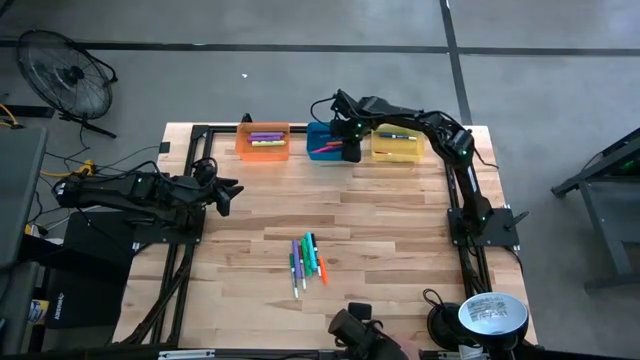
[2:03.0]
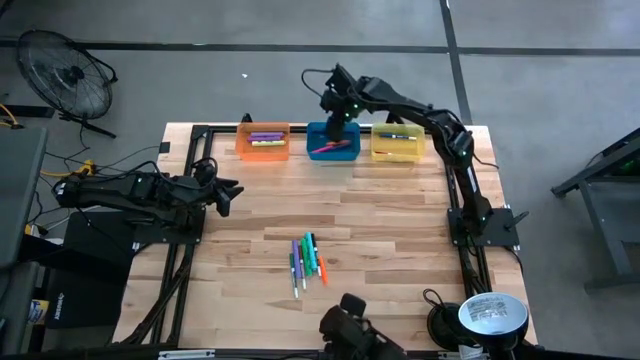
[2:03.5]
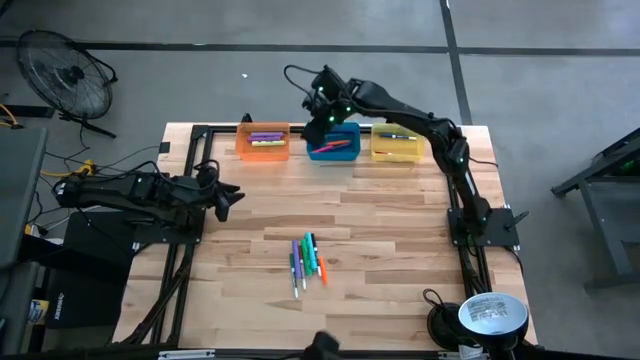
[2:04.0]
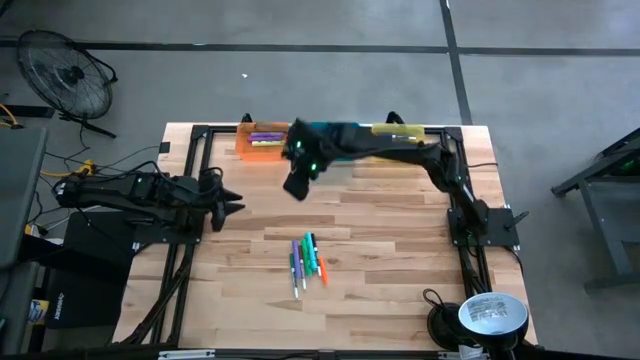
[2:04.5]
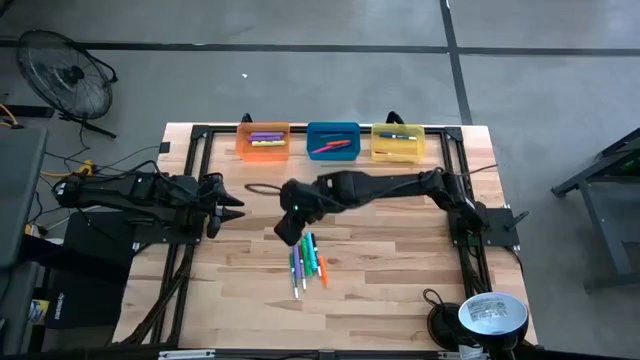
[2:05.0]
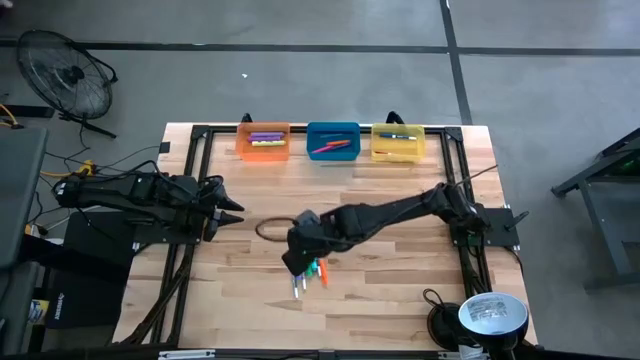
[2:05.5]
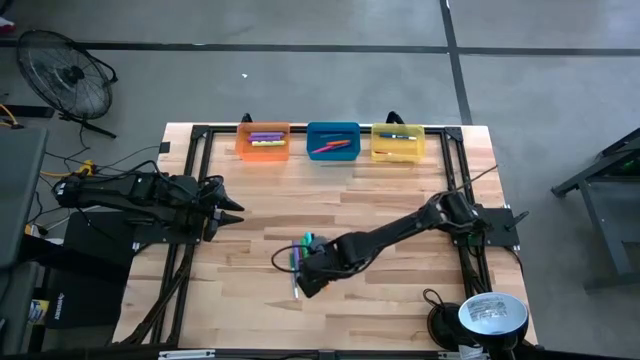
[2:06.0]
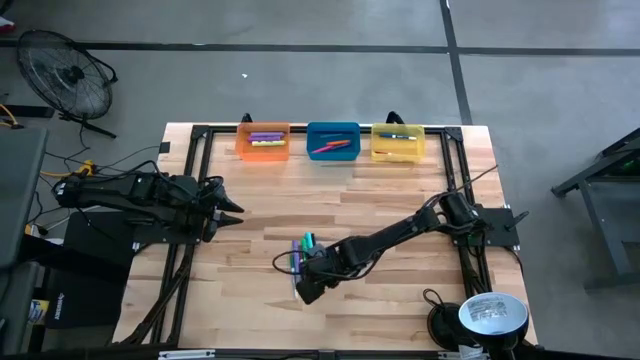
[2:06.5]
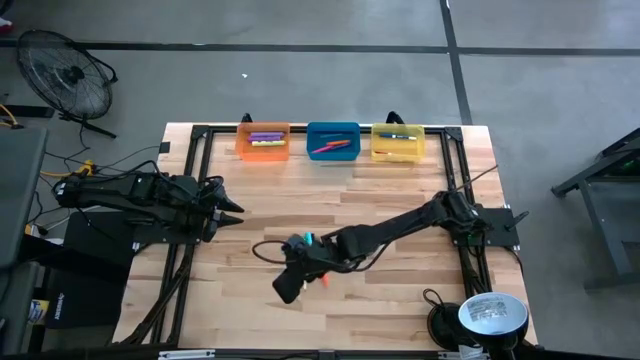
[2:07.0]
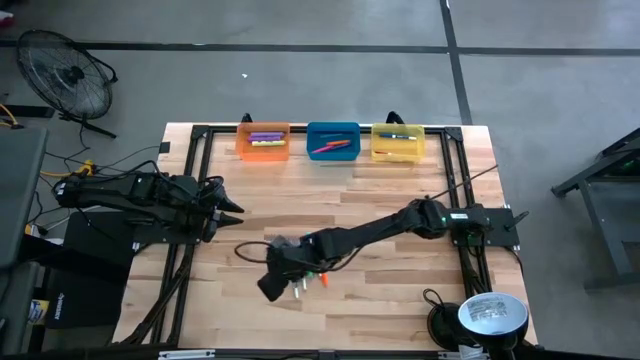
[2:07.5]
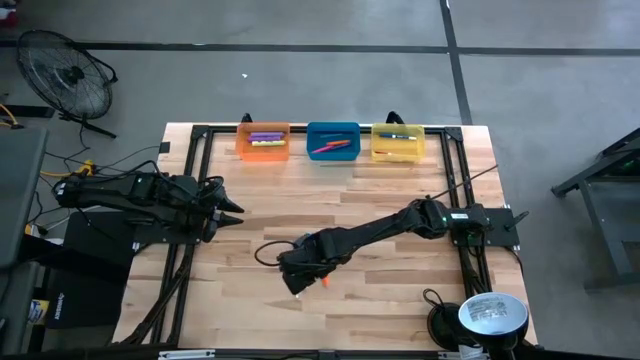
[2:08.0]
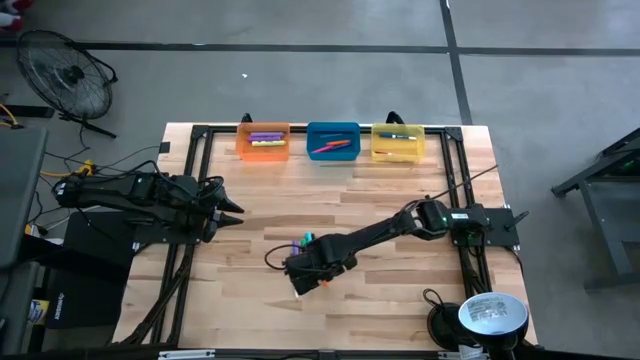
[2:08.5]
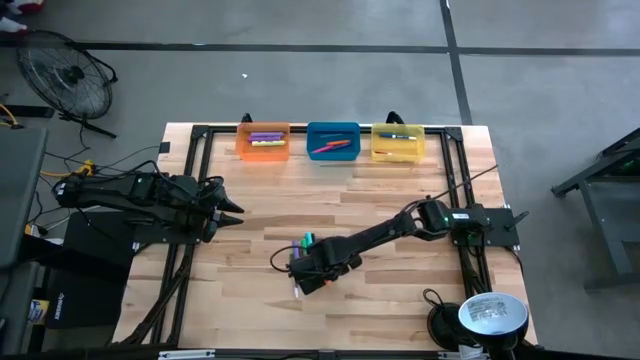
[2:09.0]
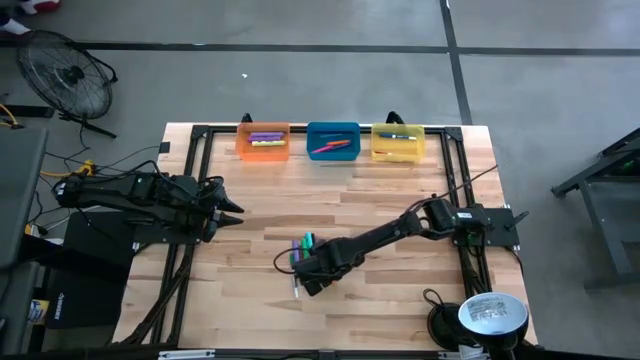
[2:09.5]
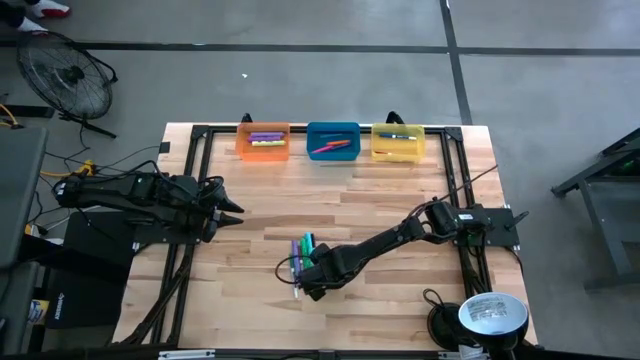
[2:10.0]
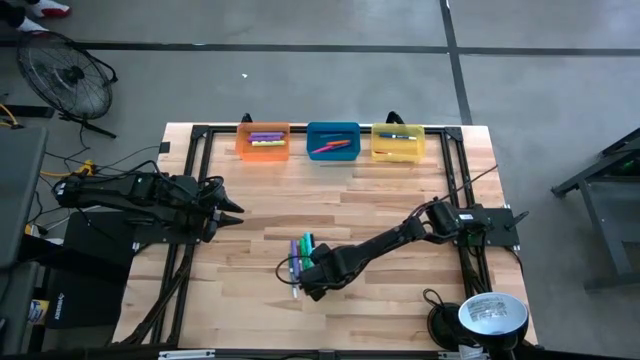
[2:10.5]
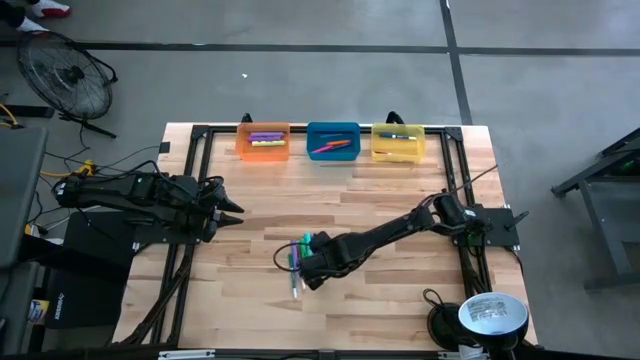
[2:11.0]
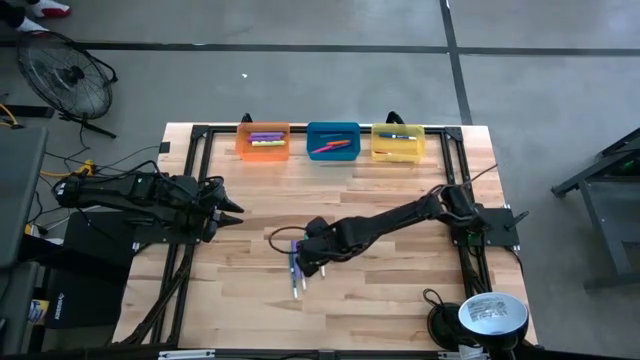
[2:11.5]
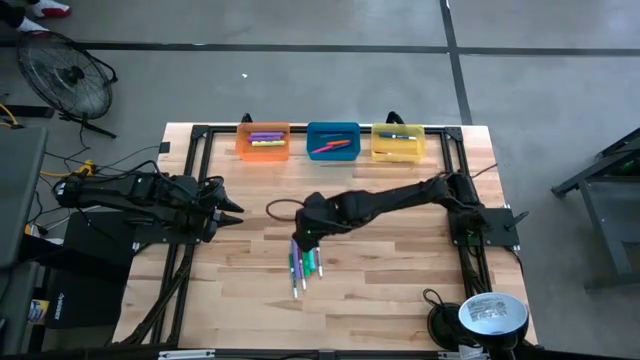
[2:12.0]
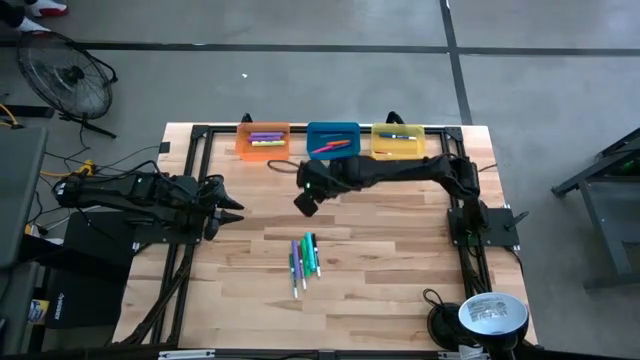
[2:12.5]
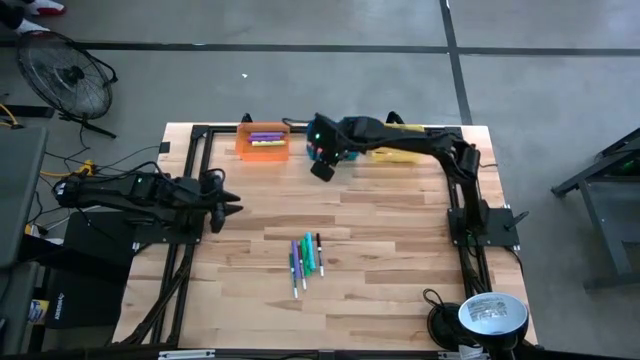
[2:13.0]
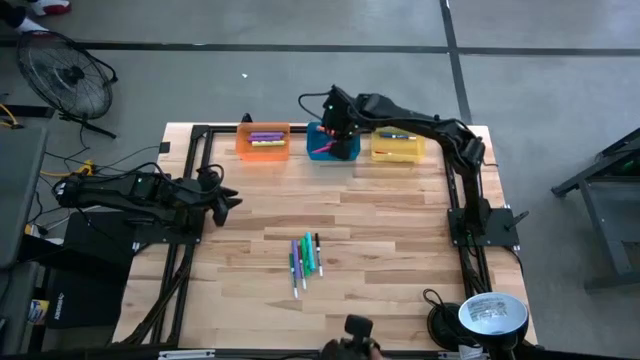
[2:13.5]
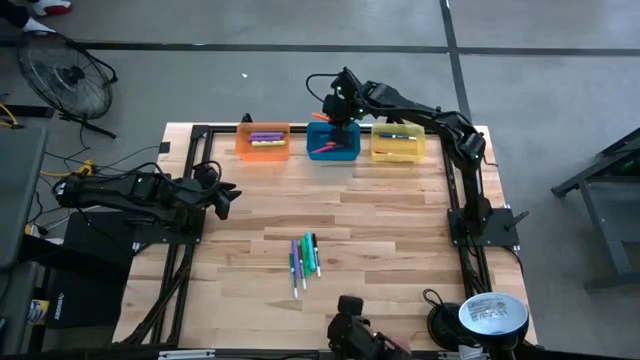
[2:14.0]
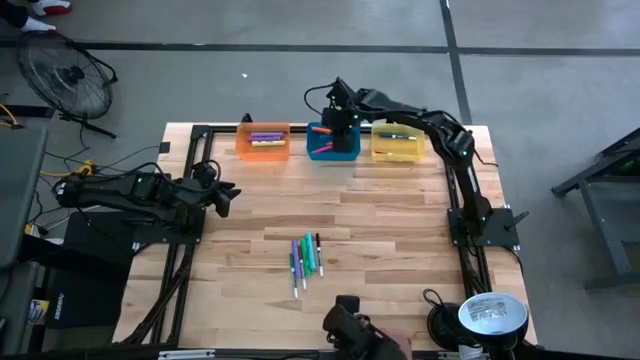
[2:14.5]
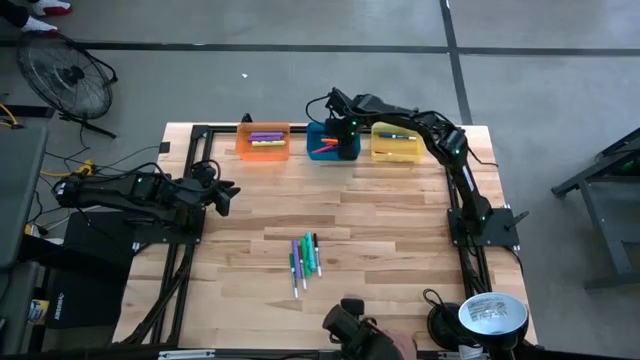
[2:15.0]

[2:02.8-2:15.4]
Task: Pick & Place Markers
Put the orange pen into the blue bin

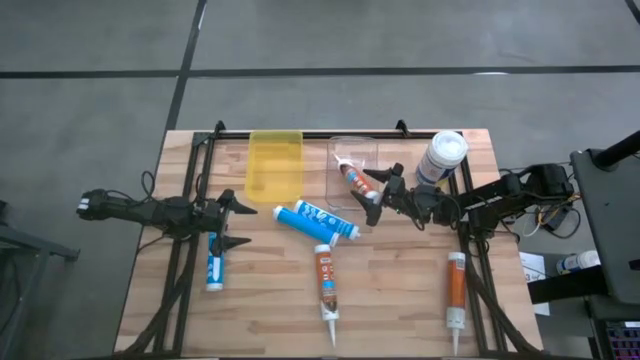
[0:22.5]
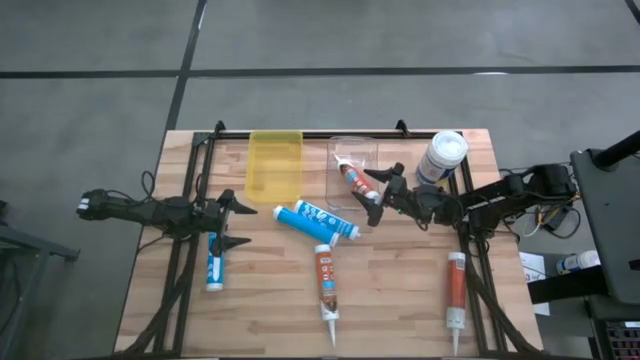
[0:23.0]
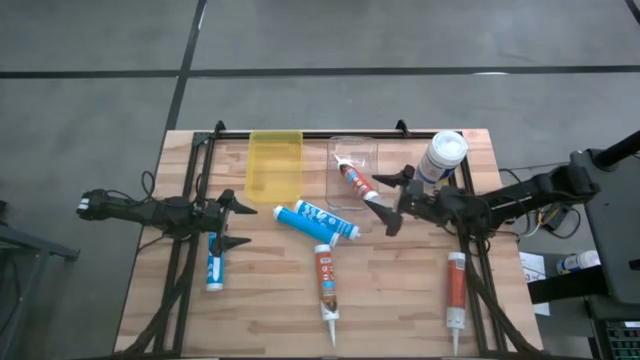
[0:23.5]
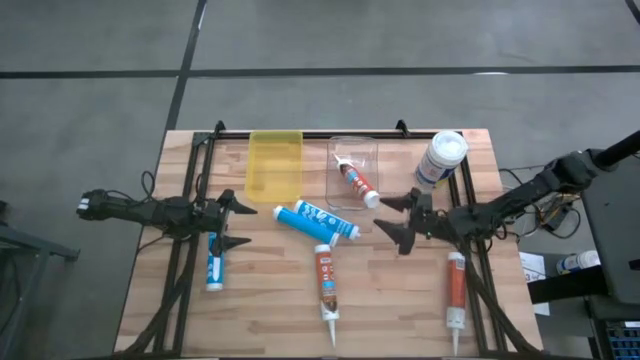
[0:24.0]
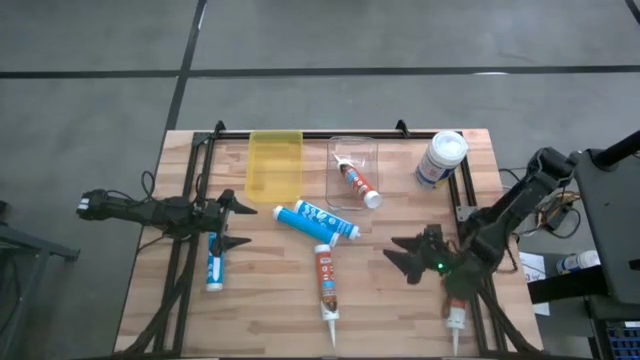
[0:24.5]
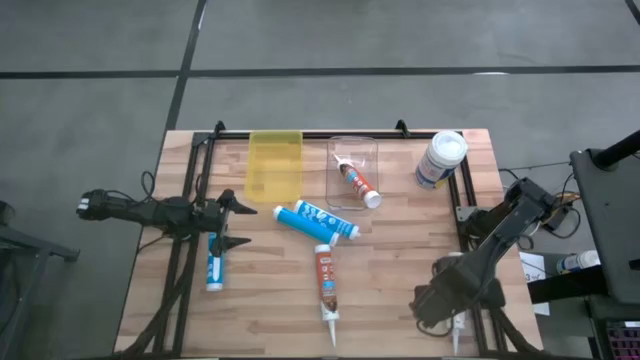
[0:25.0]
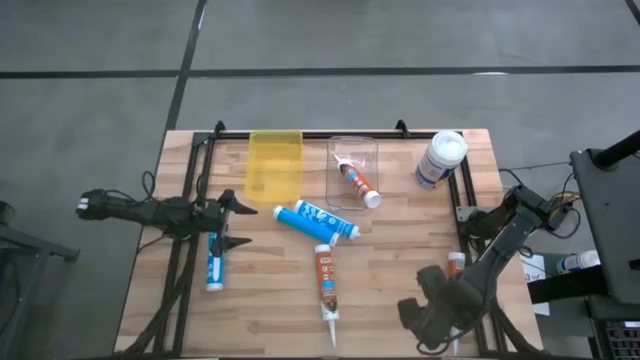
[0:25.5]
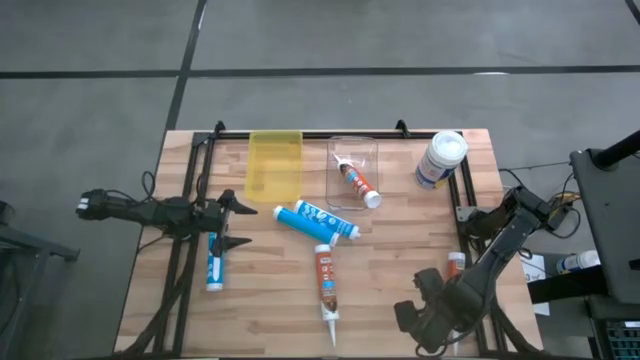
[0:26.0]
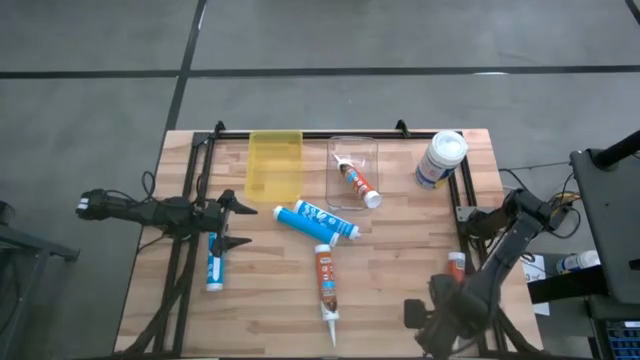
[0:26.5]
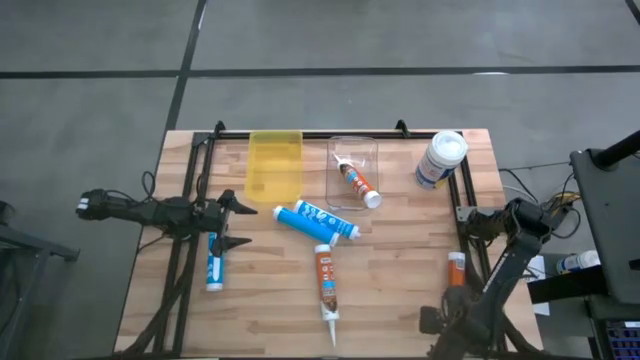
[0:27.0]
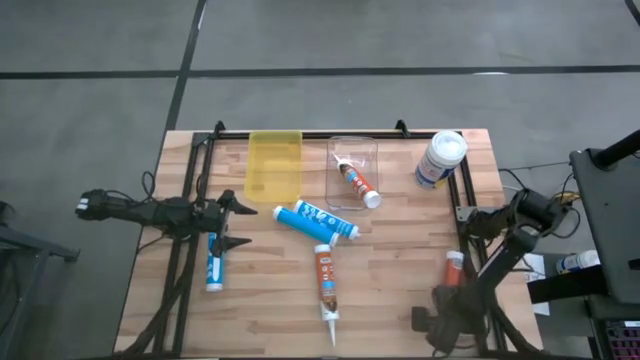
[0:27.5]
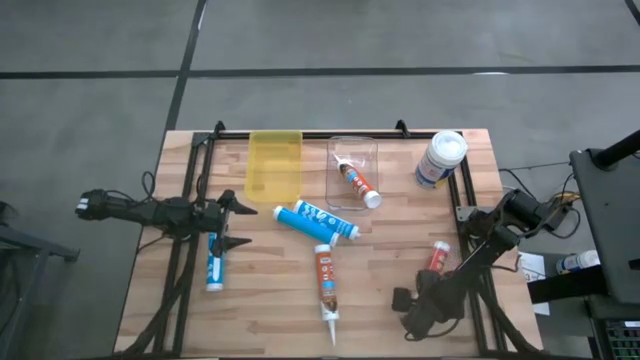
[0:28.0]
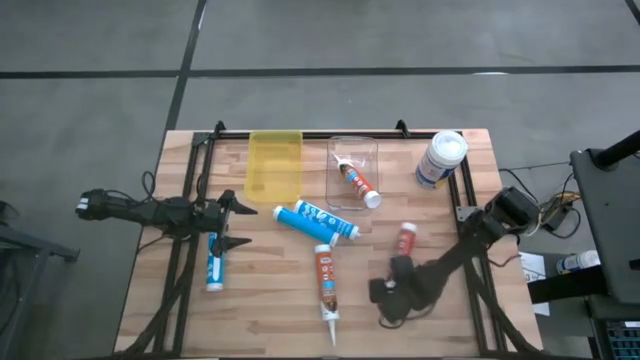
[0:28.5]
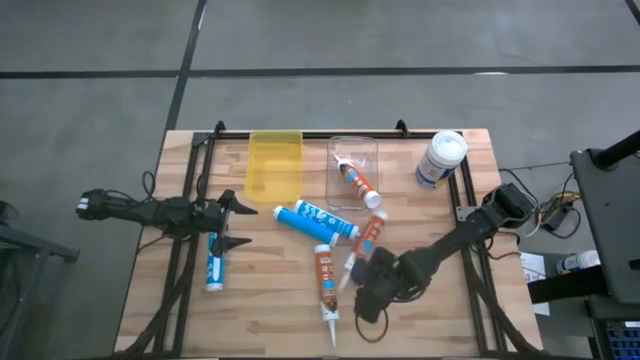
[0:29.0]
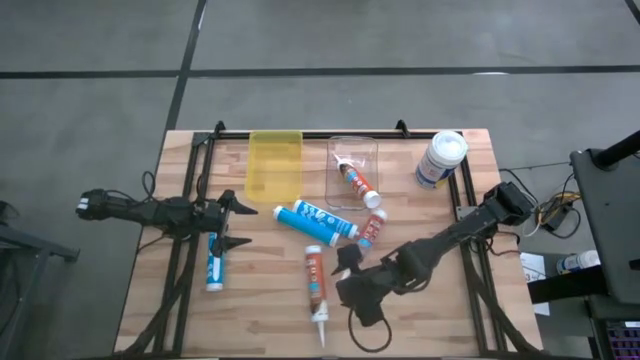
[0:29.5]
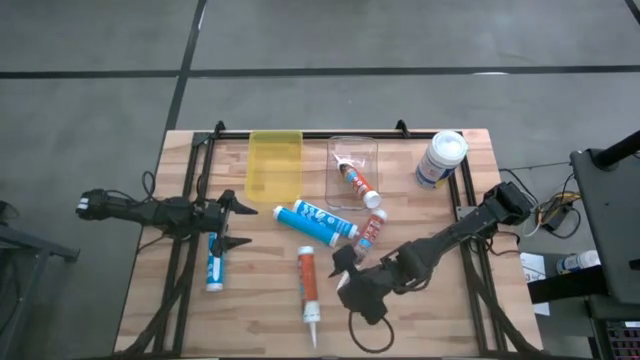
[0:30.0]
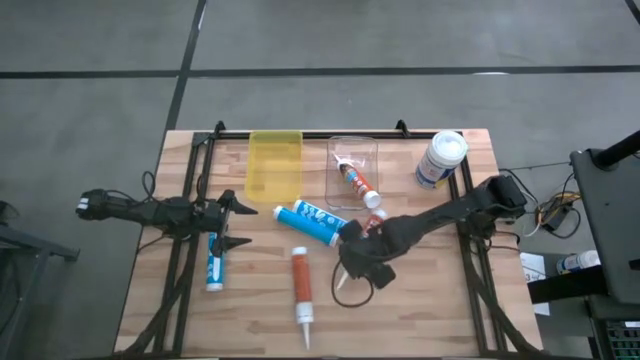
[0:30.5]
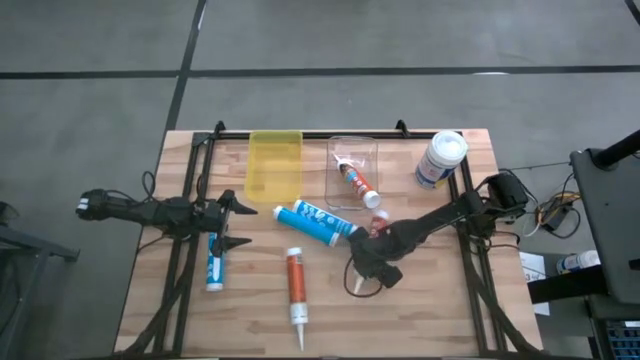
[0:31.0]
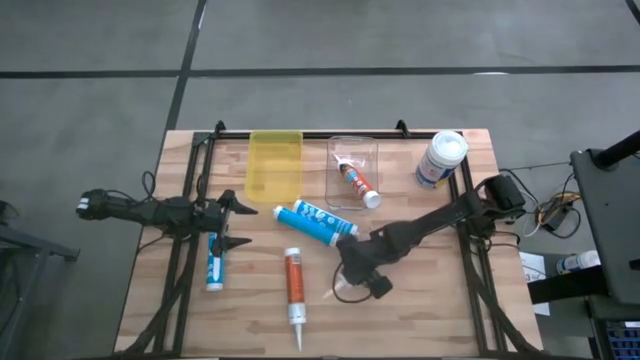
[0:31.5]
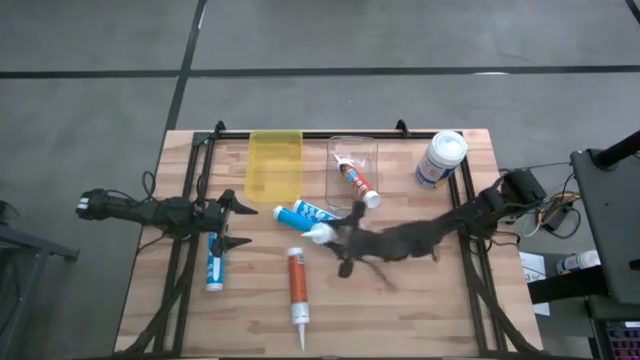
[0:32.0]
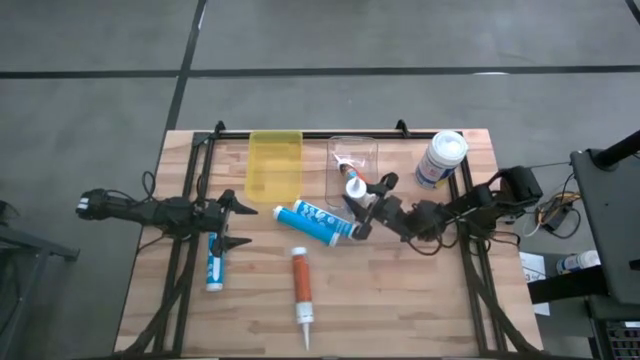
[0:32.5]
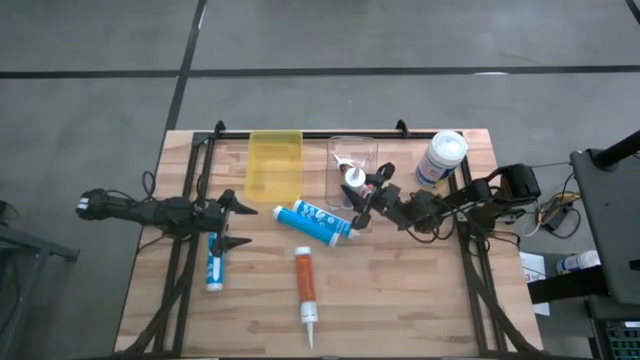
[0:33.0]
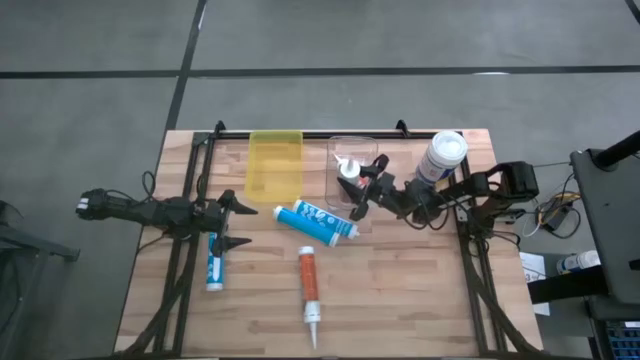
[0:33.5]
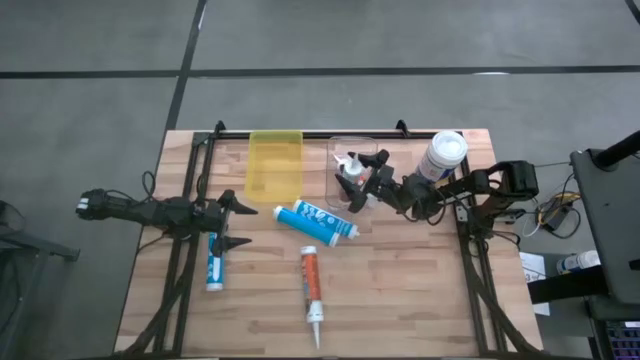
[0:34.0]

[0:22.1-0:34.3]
Task: Pick & place silicon tubes, Sealant and Lysol wipes
Put the right orange sealant into the transparent bin
